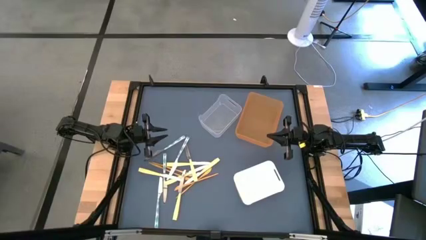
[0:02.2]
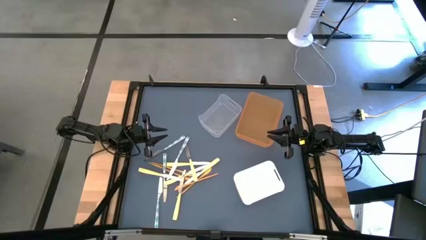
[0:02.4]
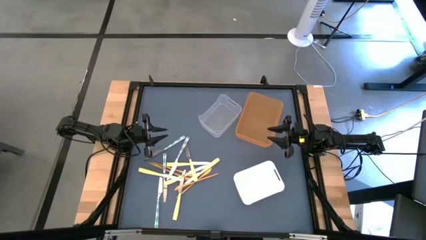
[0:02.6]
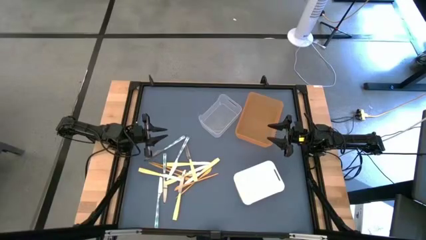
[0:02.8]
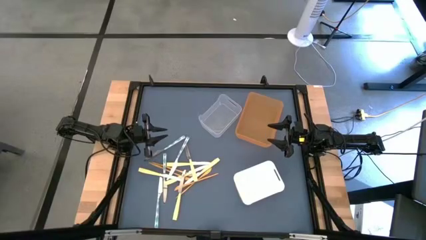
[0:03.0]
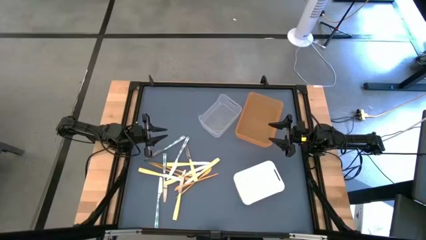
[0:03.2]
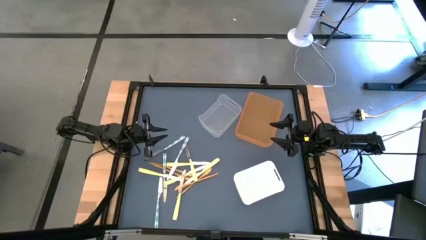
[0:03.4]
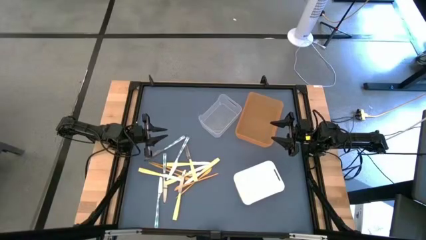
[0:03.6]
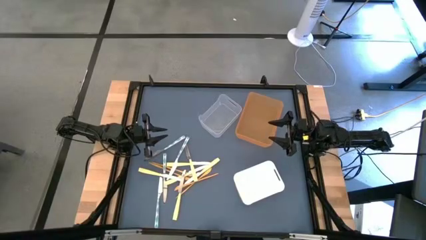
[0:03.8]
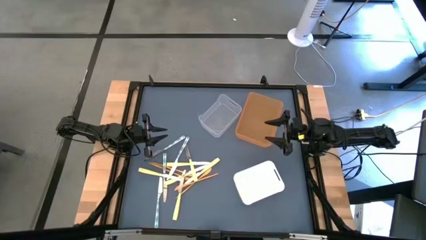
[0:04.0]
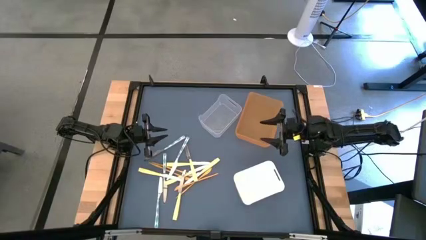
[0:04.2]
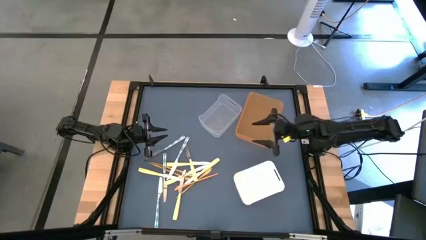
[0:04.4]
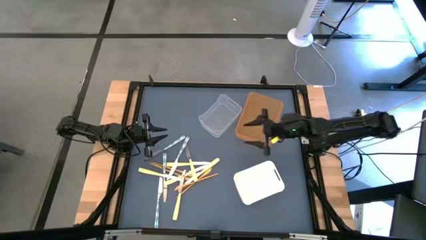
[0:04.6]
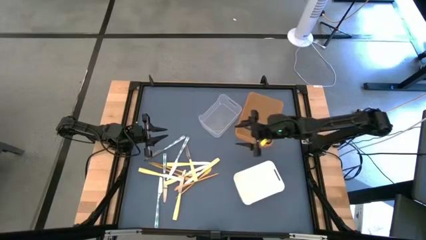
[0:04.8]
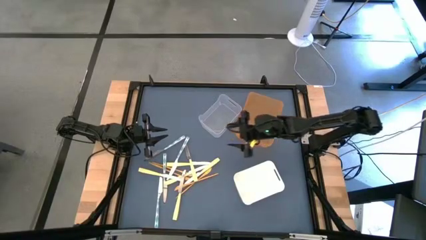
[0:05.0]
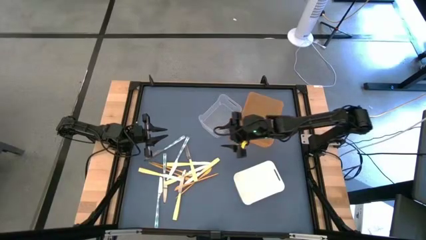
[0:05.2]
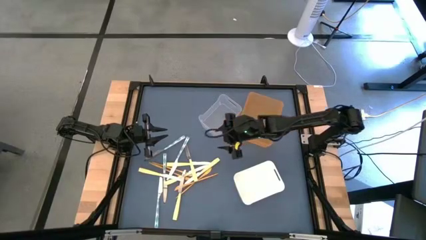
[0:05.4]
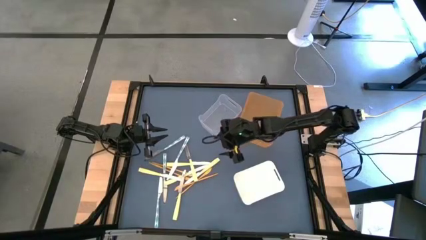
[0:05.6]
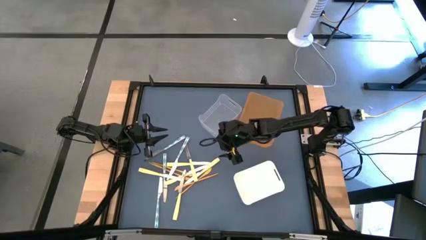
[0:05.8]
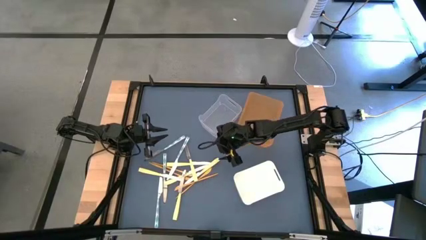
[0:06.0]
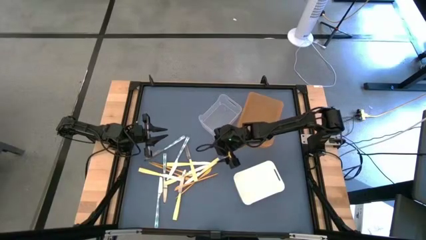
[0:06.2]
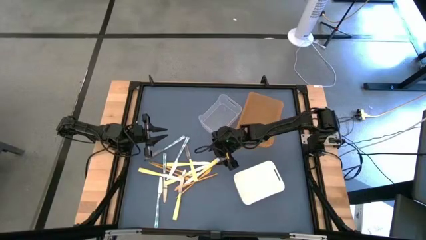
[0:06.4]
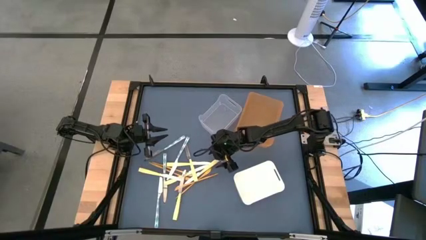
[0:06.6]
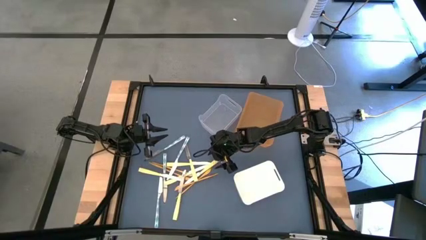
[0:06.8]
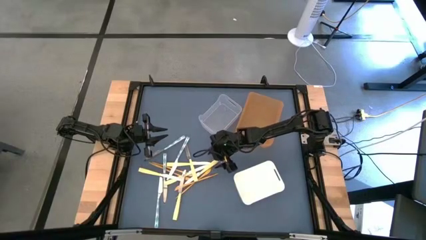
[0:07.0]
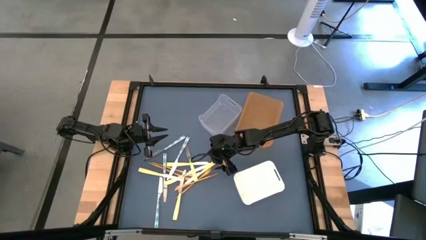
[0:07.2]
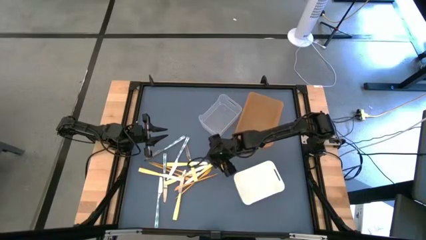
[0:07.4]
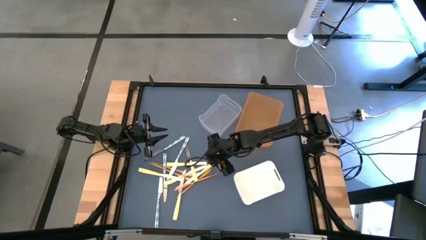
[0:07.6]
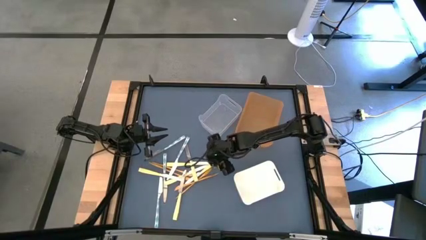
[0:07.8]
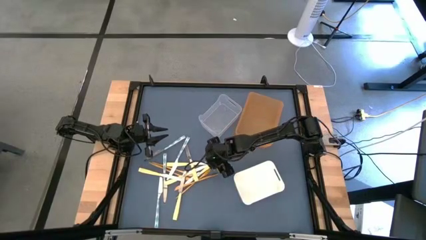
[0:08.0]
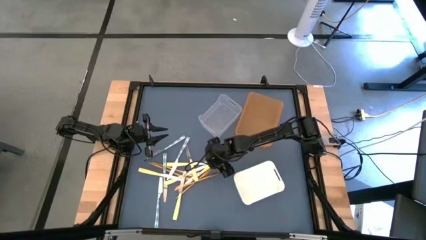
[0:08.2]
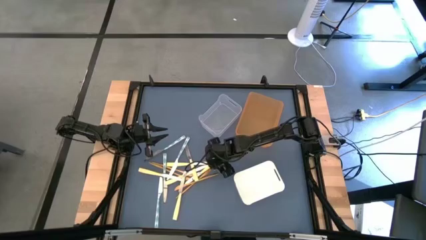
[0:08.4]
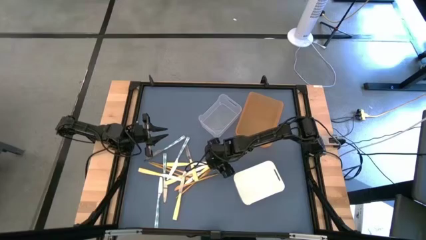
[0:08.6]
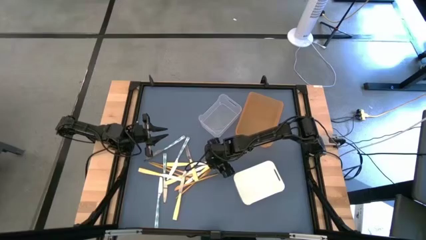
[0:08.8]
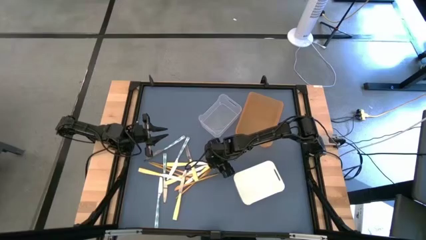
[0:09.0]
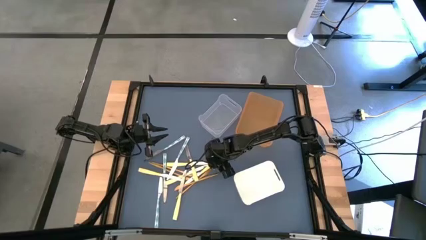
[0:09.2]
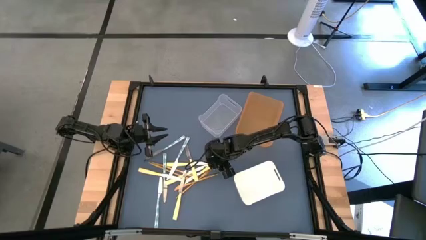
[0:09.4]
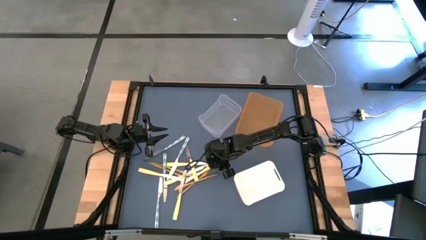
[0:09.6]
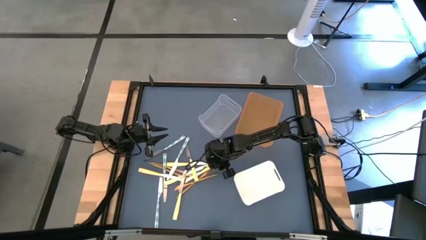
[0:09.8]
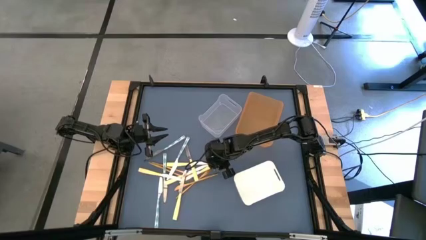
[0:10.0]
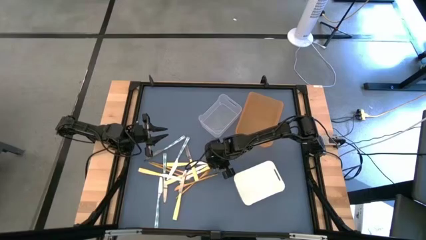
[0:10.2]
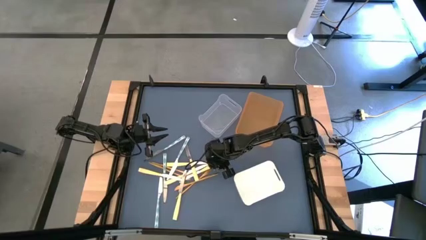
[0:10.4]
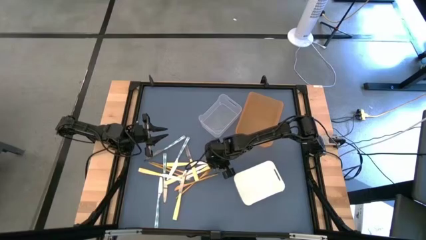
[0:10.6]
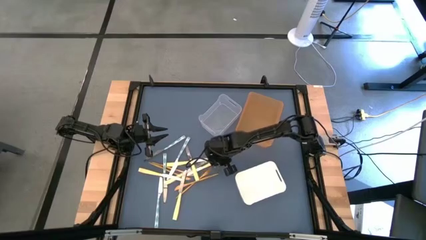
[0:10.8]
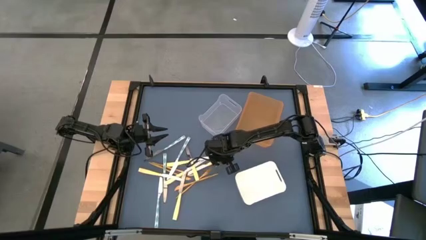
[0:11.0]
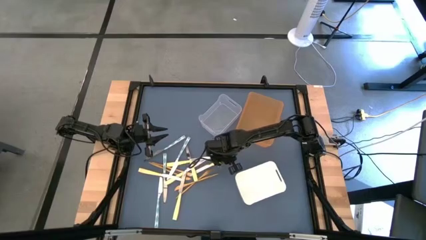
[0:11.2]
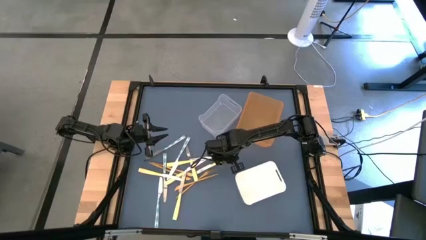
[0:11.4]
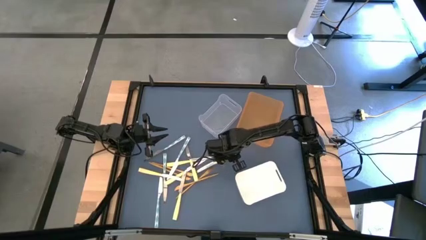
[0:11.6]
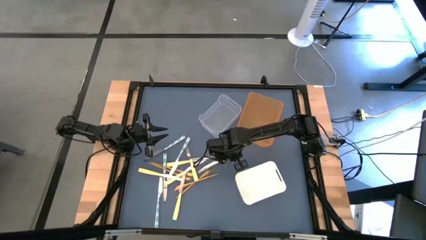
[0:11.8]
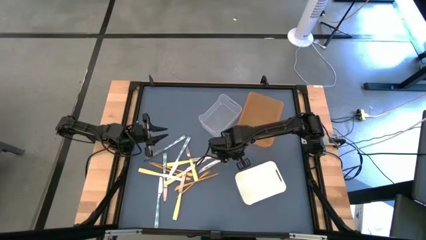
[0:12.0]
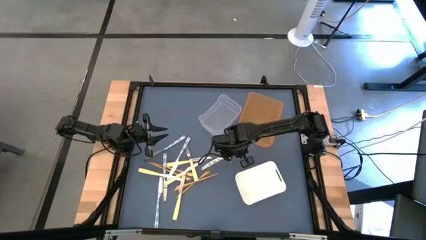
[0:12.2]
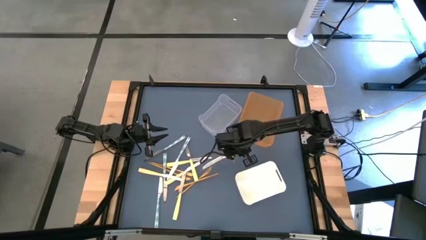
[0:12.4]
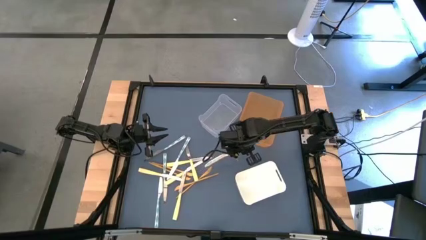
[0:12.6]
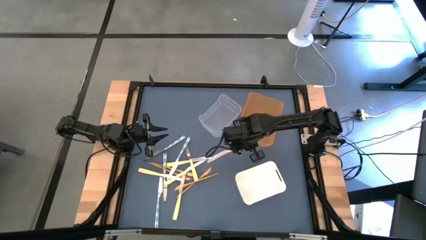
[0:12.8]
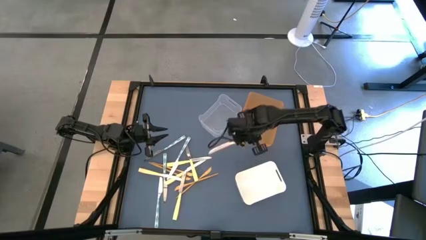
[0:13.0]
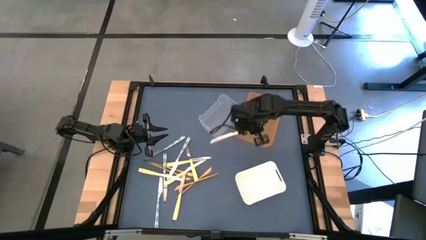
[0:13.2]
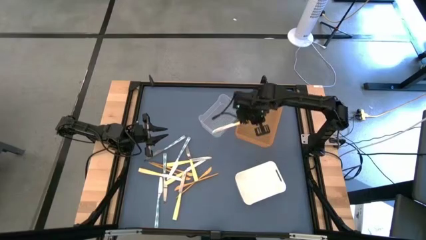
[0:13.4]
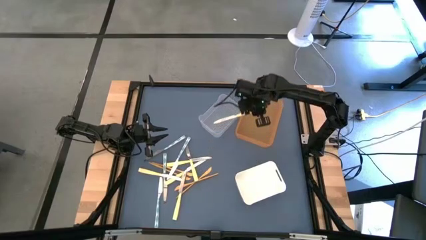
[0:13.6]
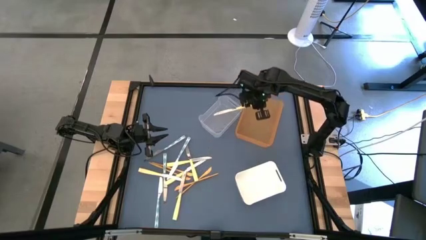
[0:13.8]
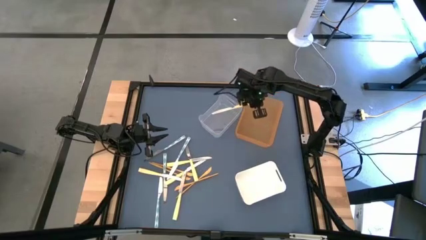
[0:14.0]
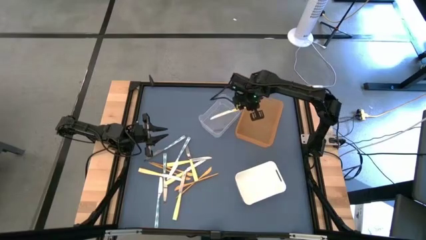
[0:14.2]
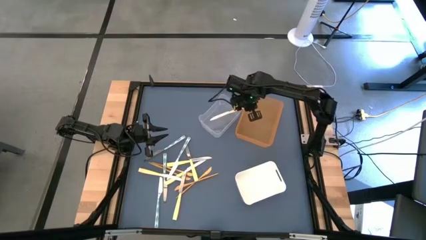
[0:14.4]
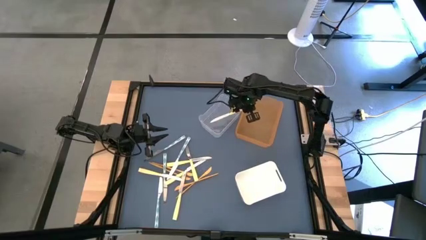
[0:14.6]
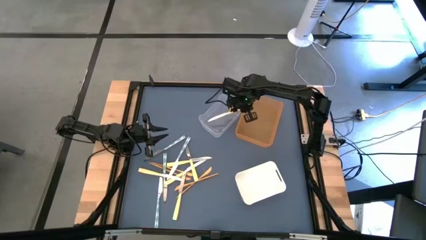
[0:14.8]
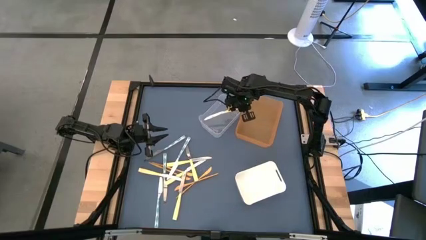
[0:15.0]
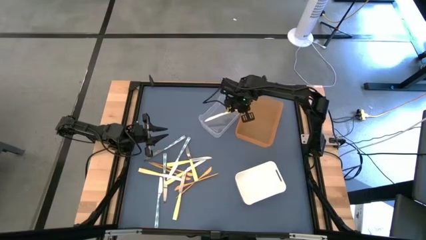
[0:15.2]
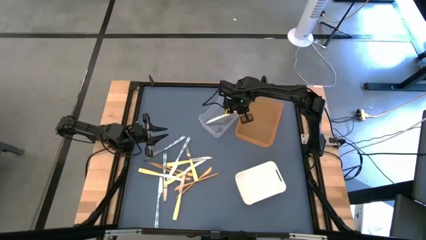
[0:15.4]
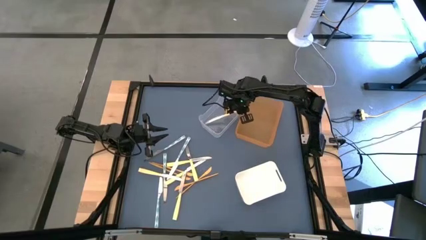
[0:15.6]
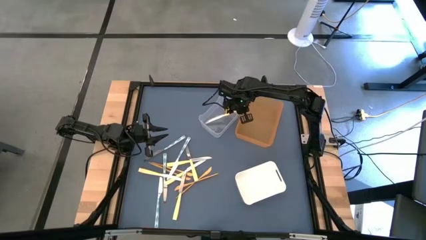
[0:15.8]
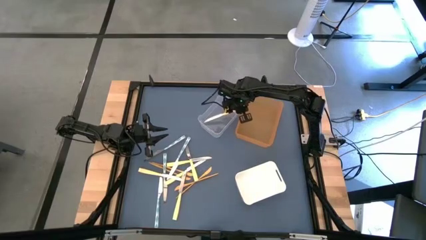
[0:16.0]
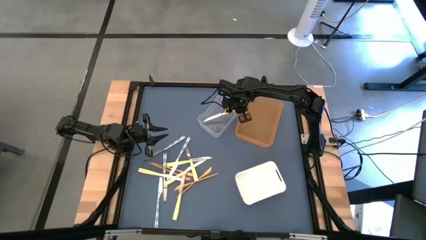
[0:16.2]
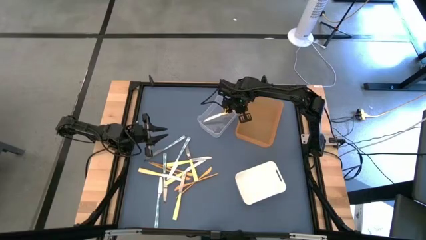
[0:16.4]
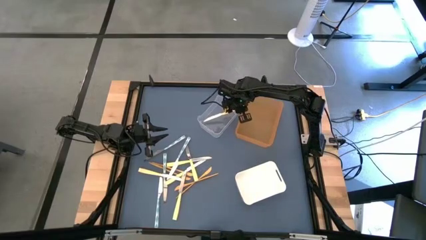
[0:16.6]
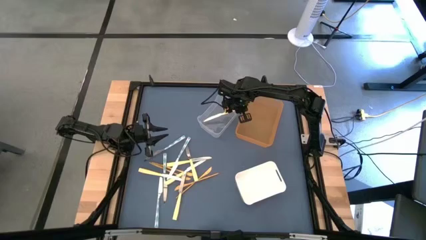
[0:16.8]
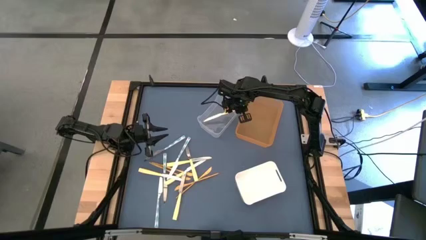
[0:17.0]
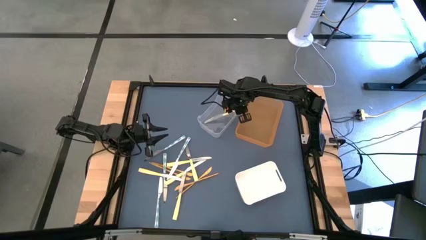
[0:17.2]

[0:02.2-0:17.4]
Task: Sort silverware by color (type)
Put the yellow knife into the transparent bin
